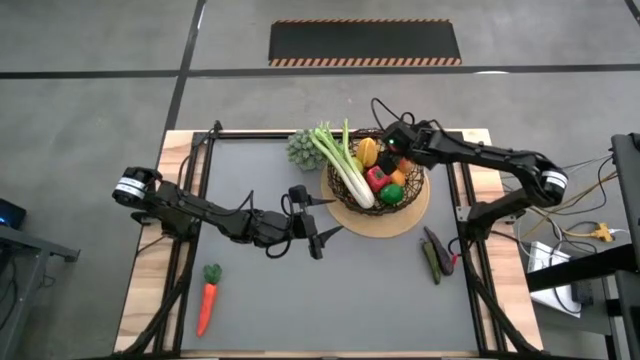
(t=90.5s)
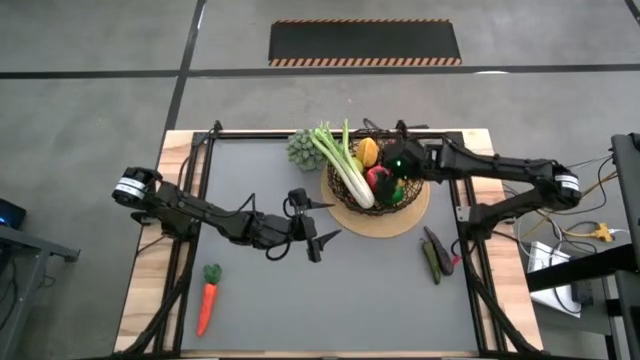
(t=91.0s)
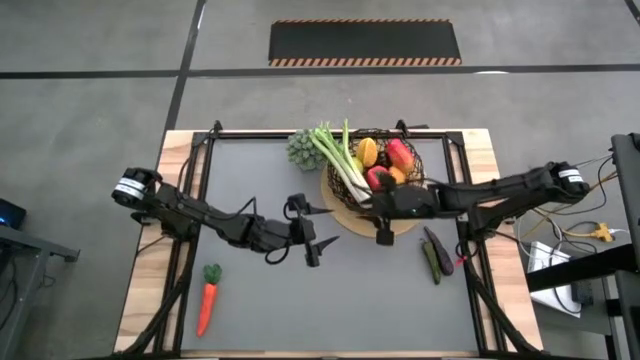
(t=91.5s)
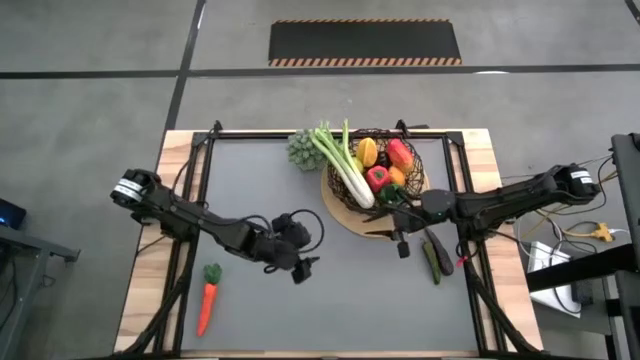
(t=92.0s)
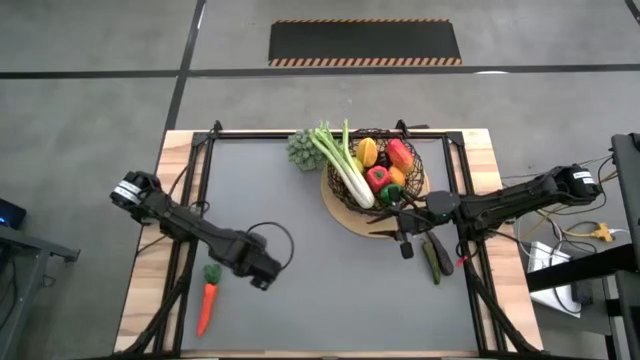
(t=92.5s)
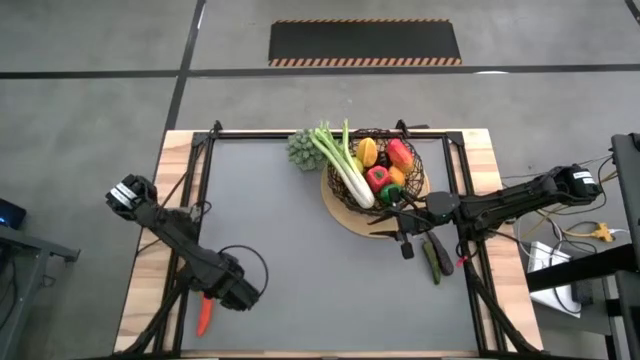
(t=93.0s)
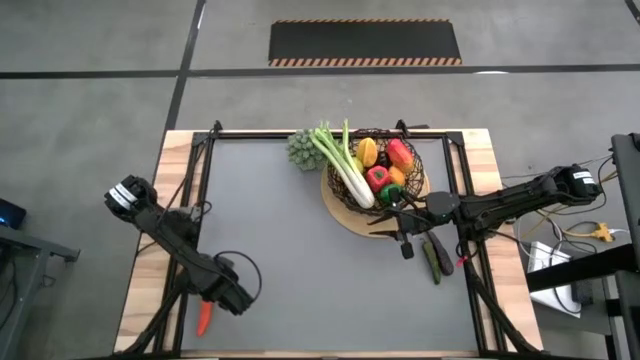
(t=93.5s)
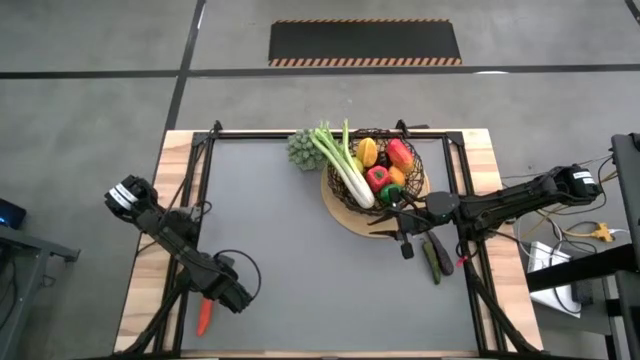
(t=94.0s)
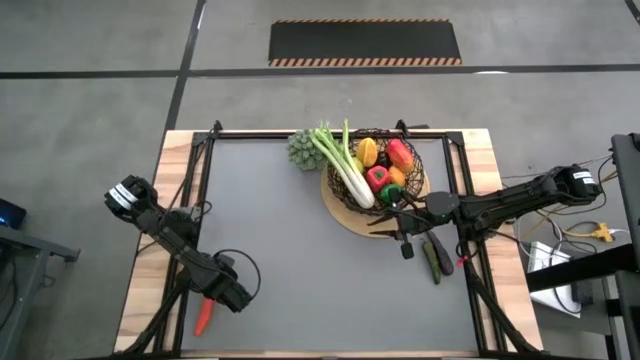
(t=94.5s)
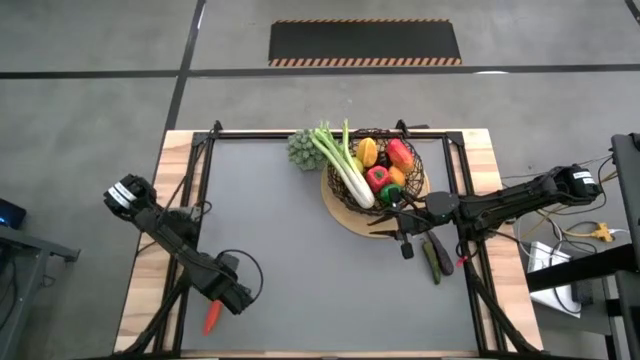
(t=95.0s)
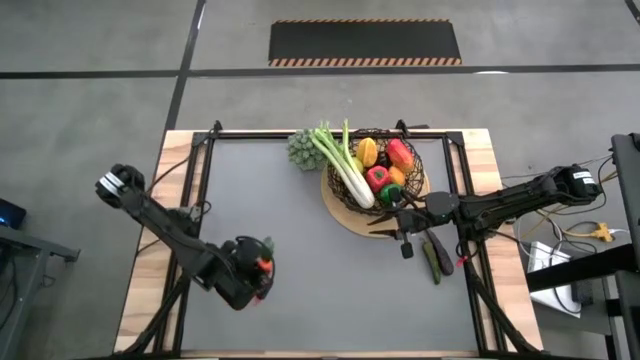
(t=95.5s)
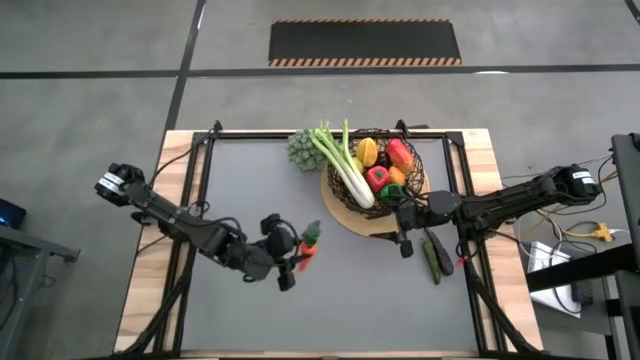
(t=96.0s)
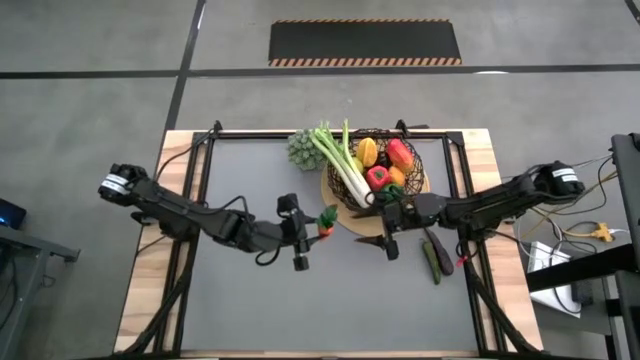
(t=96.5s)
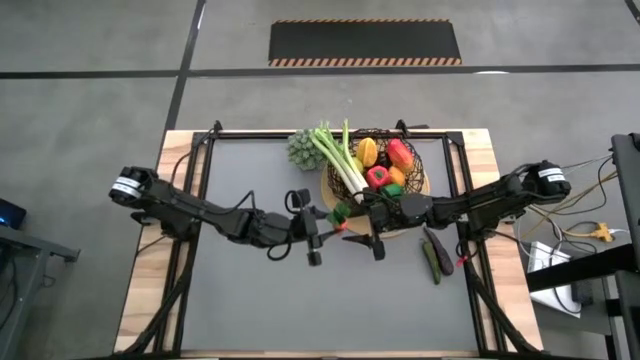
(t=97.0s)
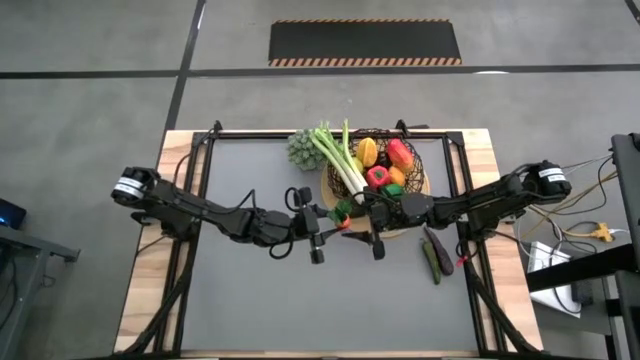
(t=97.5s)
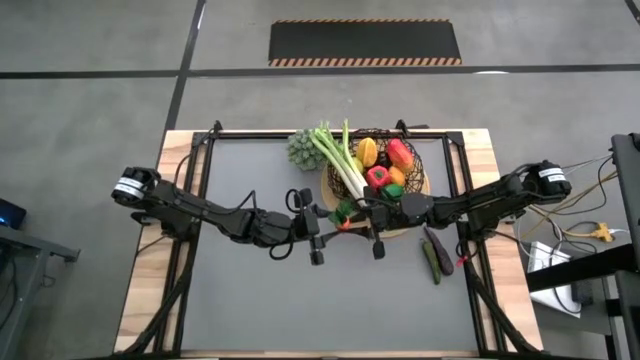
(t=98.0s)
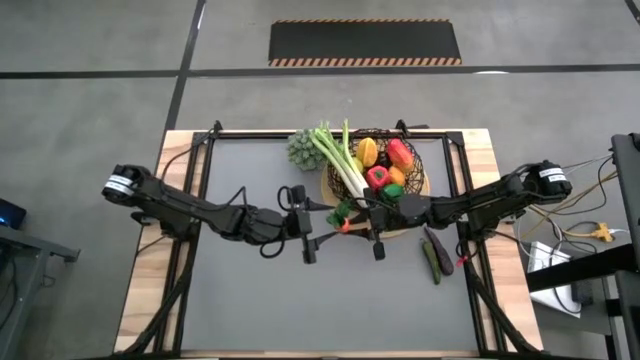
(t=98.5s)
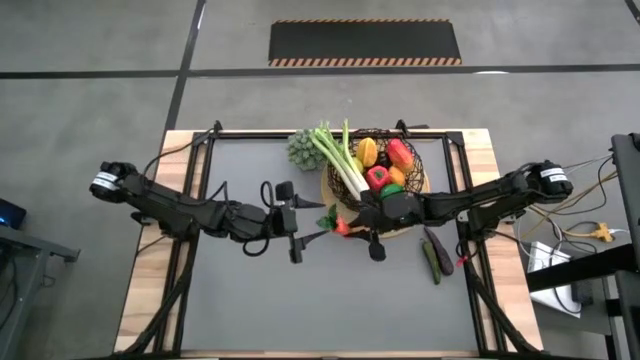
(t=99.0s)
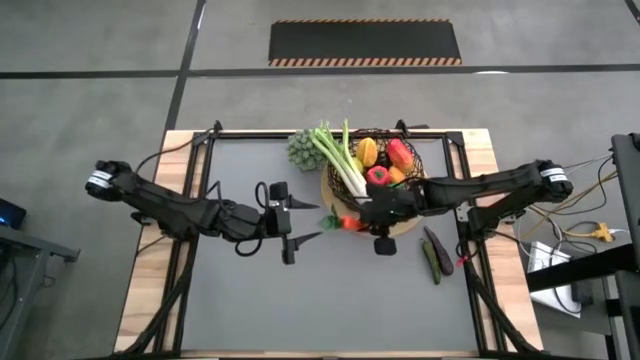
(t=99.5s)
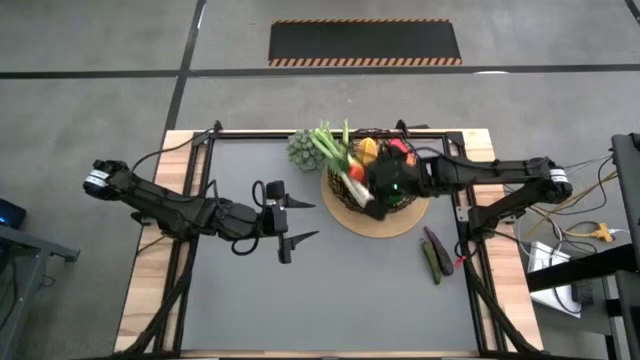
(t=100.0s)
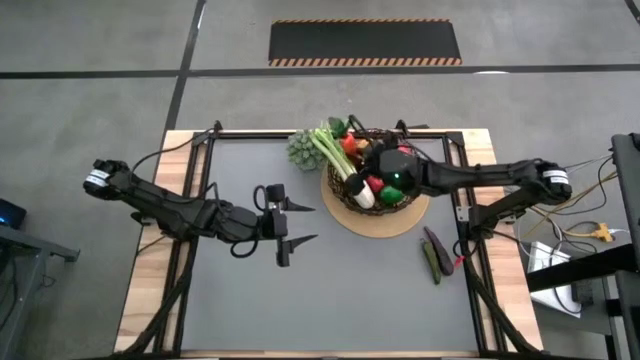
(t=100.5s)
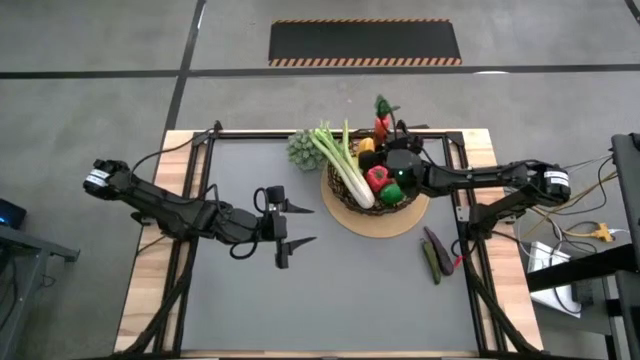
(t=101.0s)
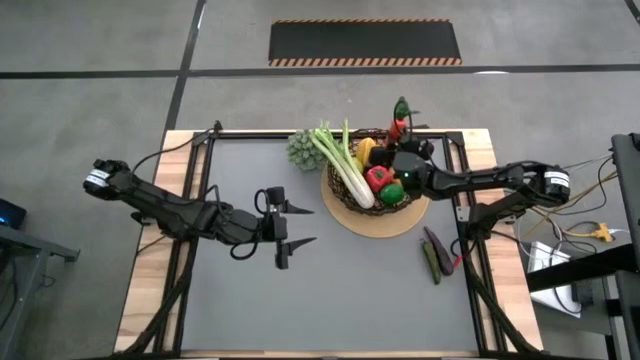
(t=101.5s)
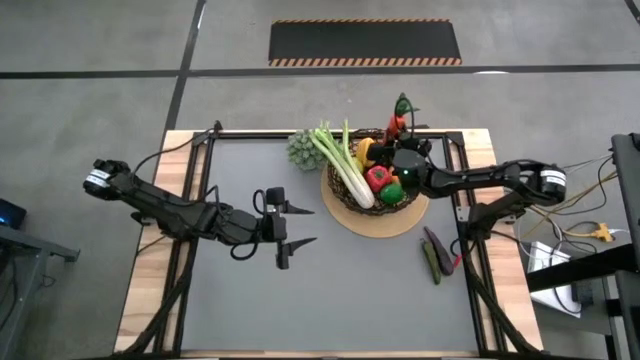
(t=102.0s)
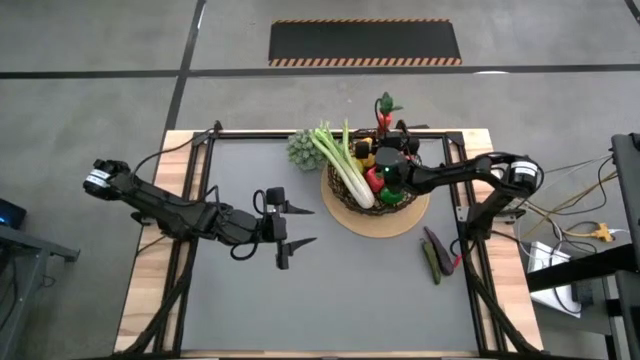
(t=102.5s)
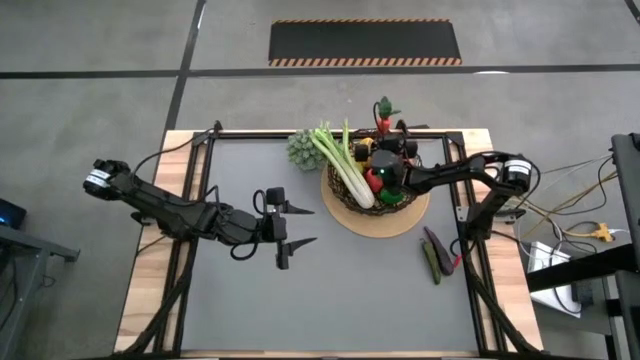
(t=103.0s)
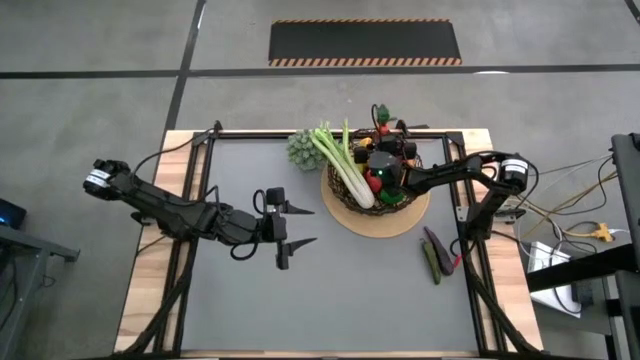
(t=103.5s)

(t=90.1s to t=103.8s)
Task: Build produce basket
Put the orange carrot into the black wire basket

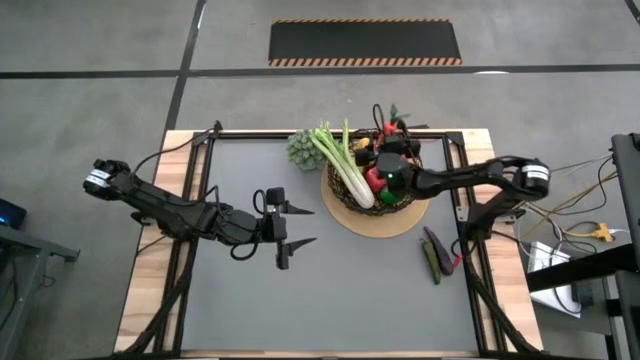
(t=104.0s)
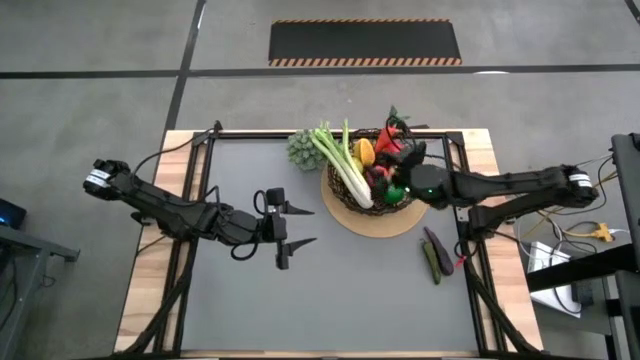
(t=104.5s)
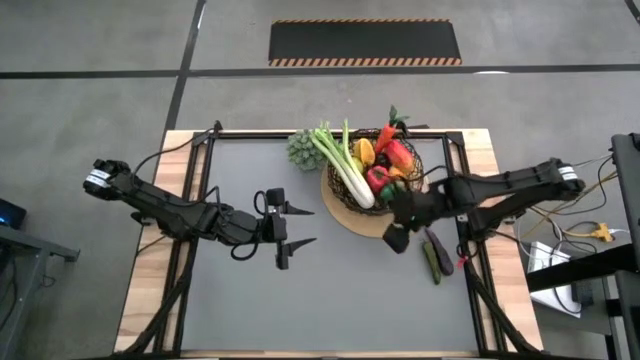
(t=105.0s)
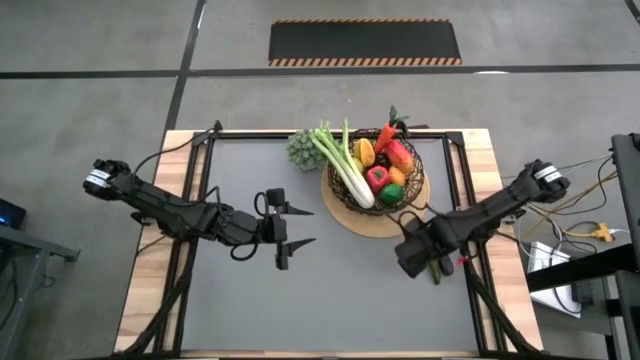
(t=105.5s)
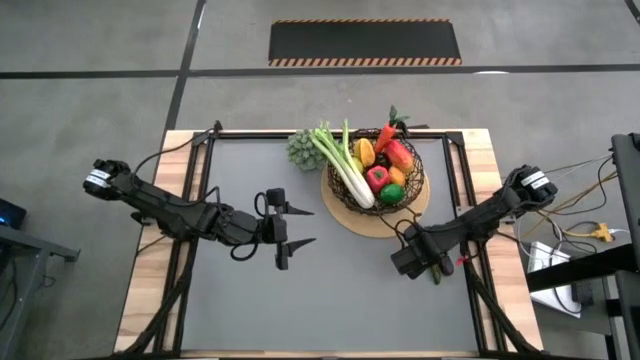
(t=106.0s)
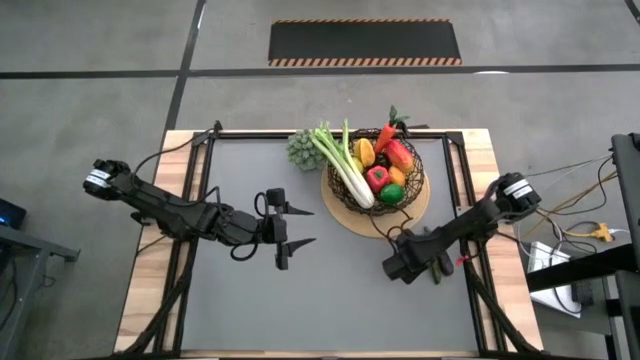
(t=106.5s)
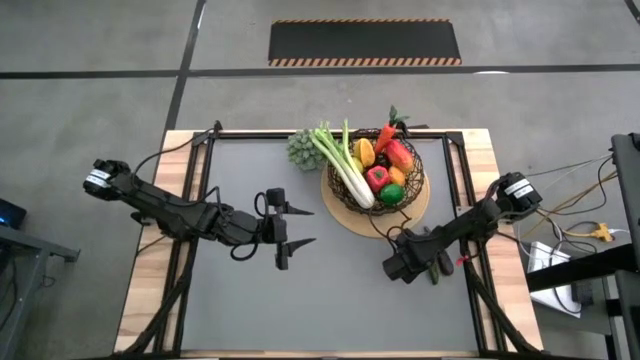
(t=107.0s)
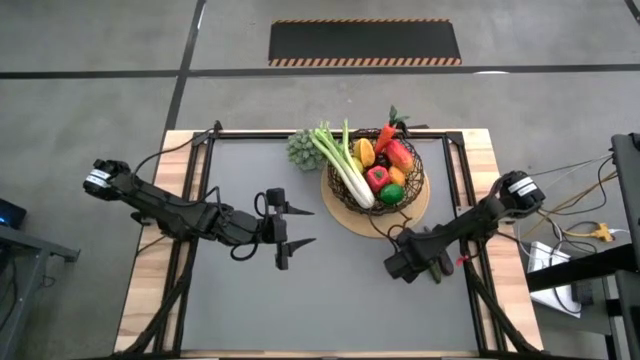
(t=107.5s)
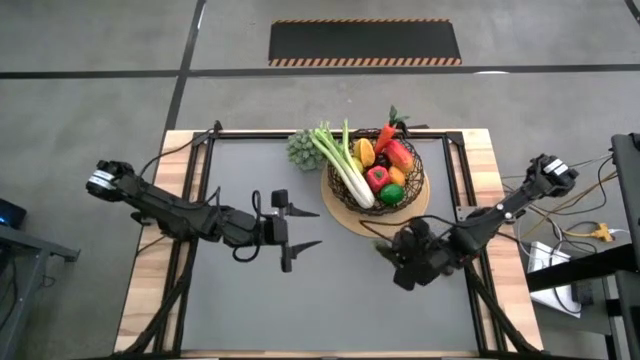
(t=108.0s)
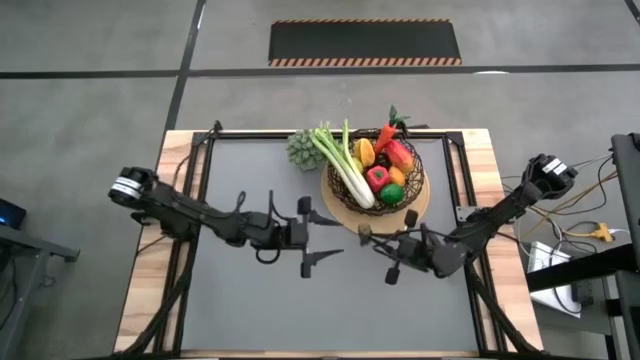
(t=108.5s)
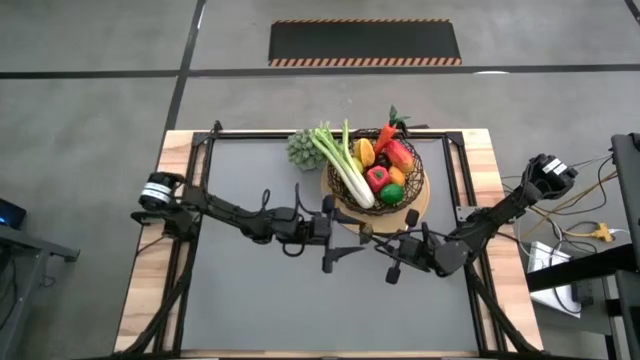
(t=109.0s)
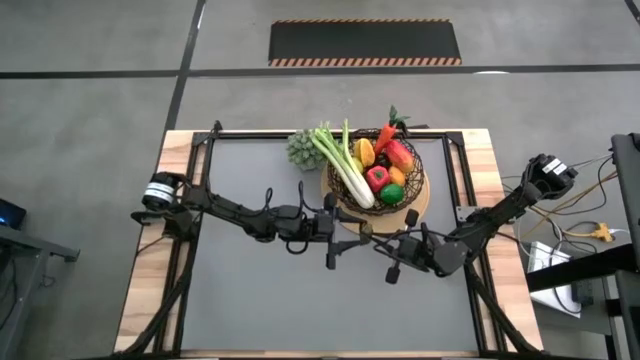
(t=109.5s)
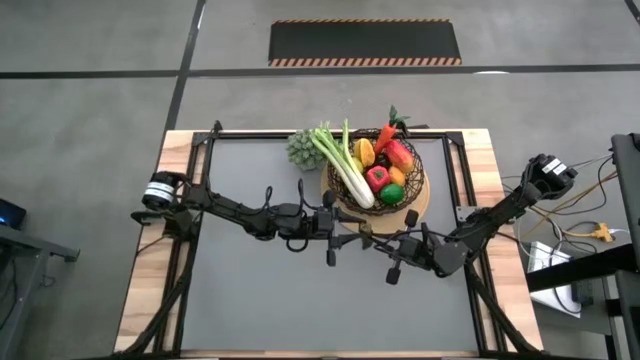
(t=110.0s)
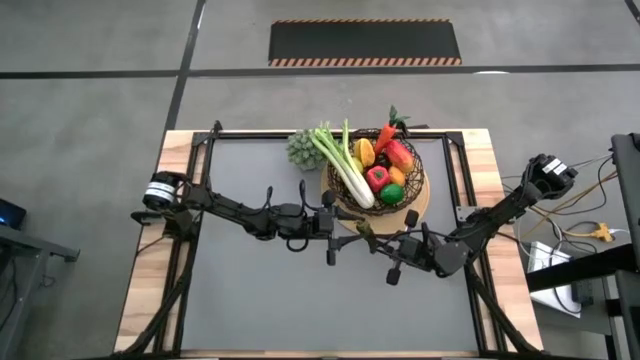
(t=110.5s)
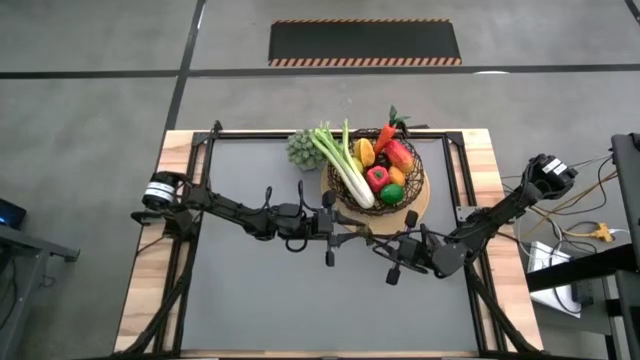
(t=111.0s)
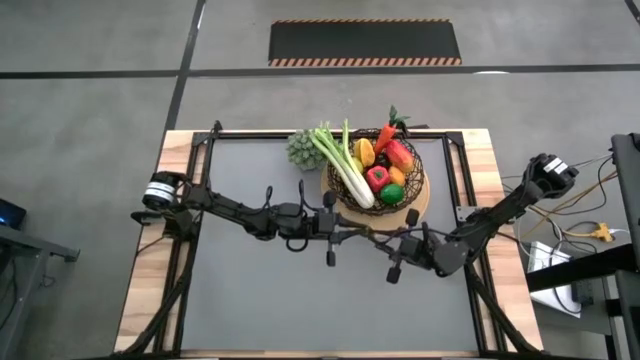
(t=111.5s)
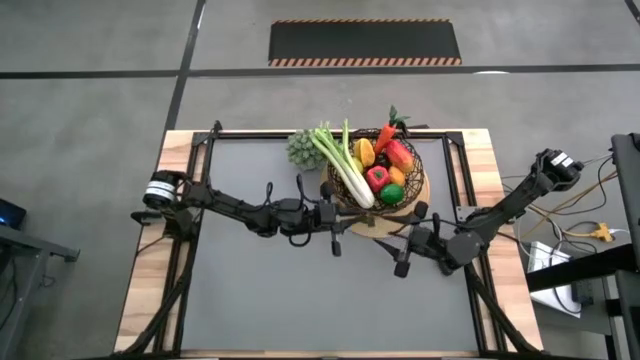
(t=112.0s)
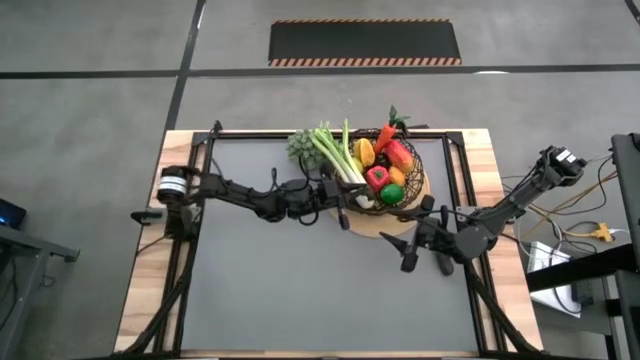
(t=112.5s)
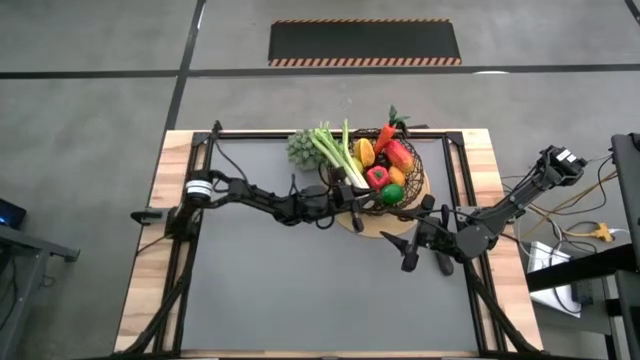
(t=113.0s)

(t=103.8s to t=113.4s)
Put the green chili pepper into the black wire basket
